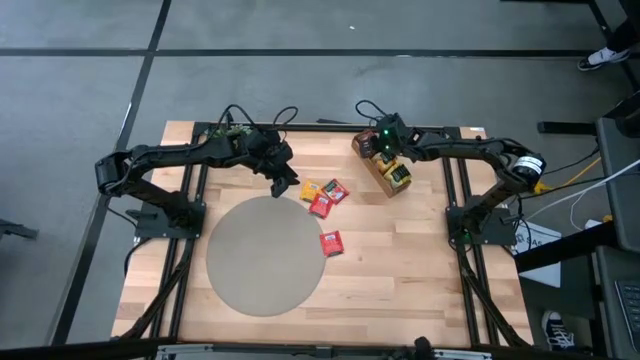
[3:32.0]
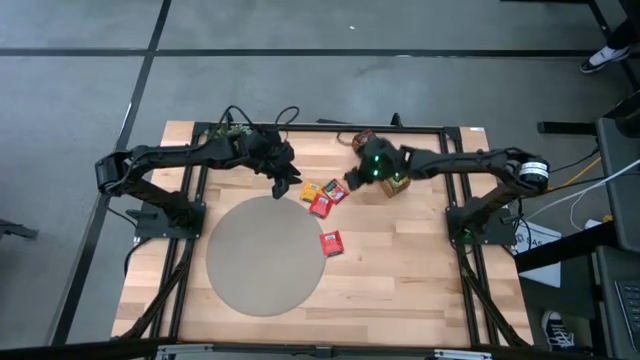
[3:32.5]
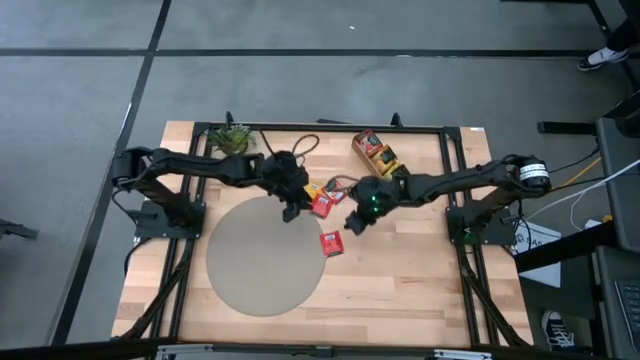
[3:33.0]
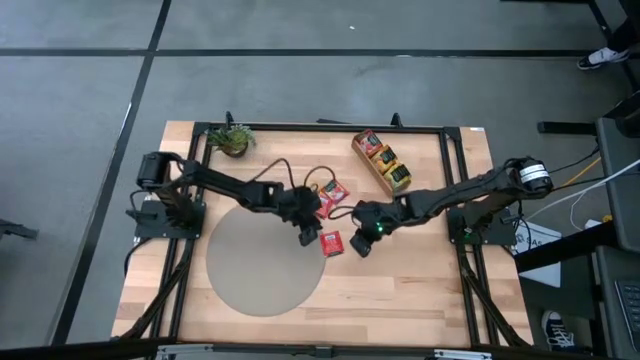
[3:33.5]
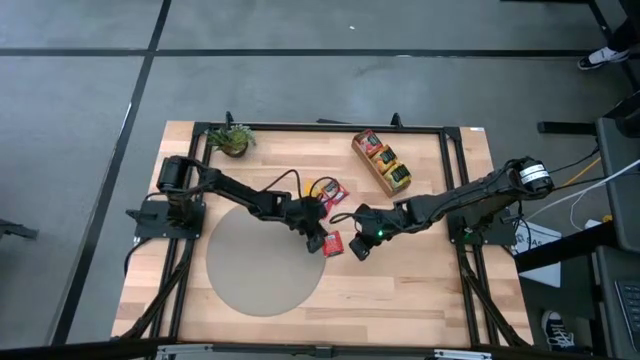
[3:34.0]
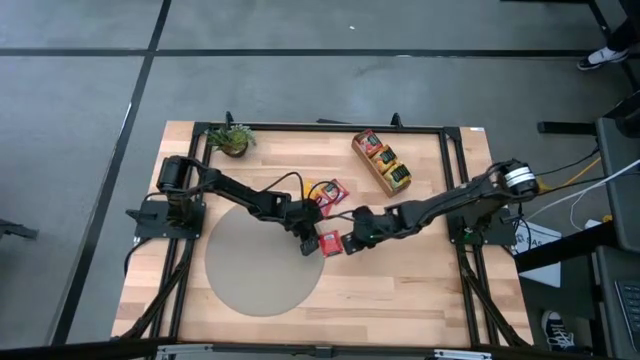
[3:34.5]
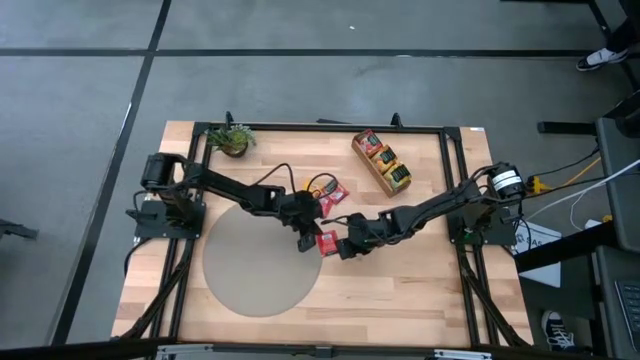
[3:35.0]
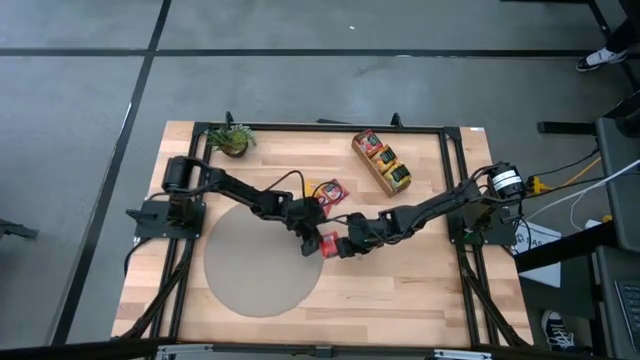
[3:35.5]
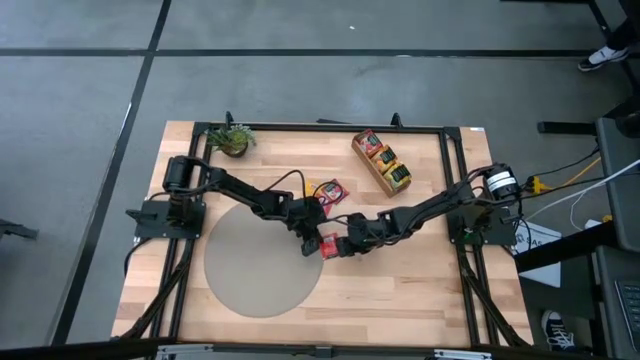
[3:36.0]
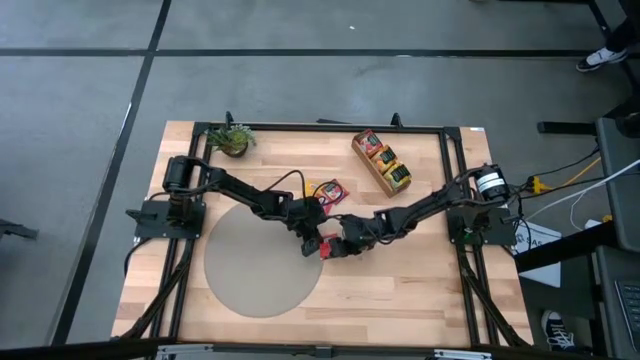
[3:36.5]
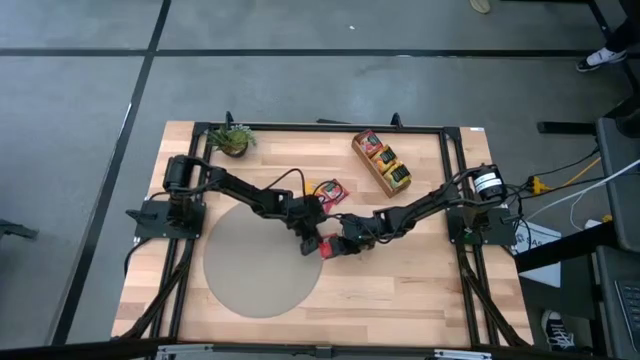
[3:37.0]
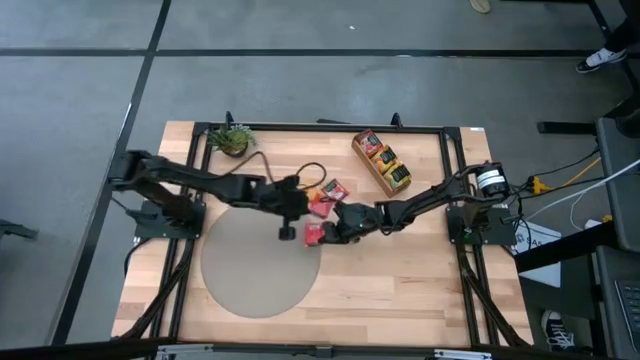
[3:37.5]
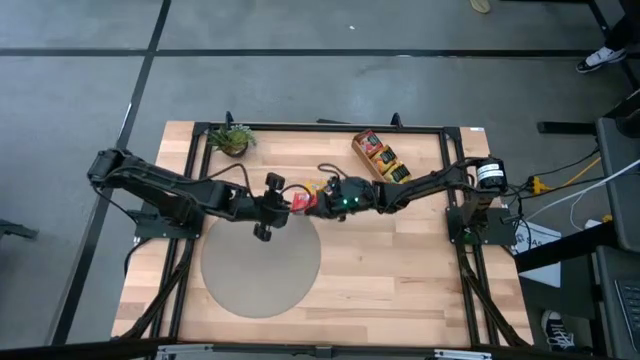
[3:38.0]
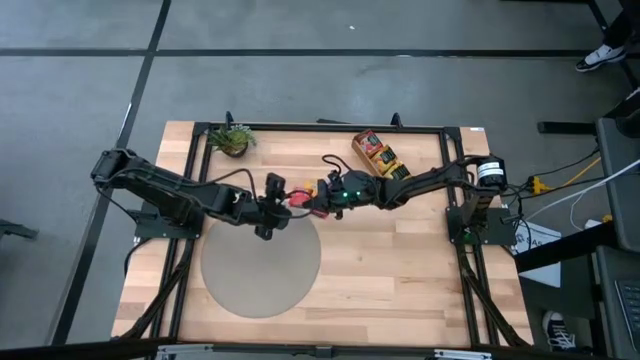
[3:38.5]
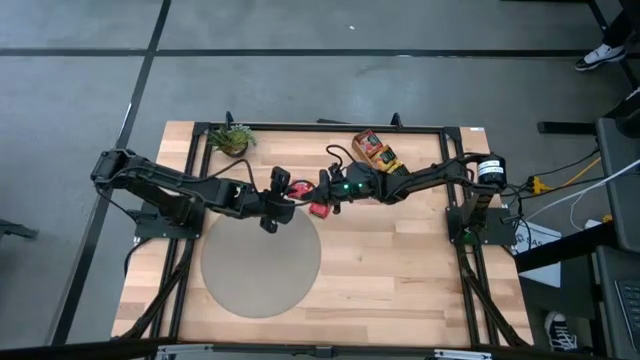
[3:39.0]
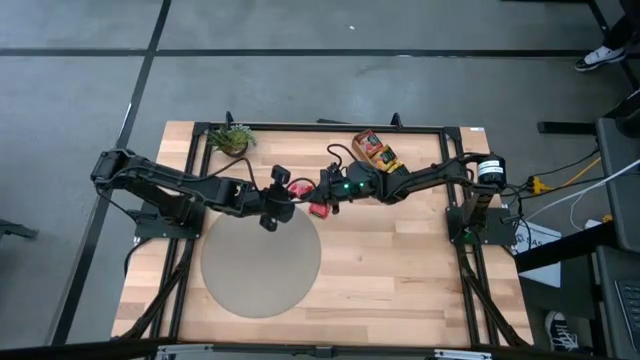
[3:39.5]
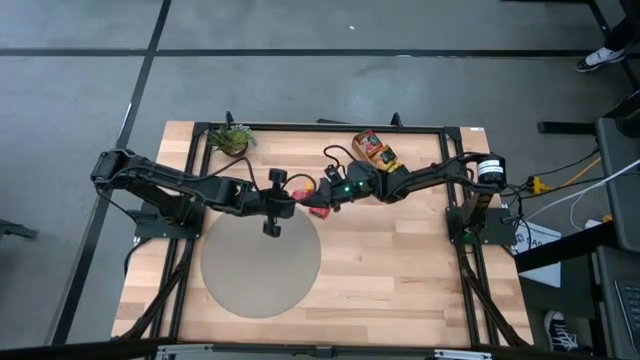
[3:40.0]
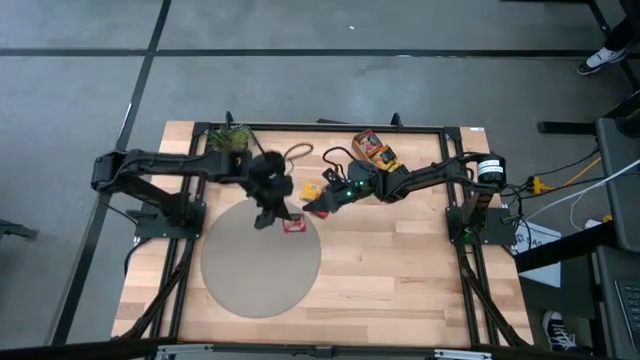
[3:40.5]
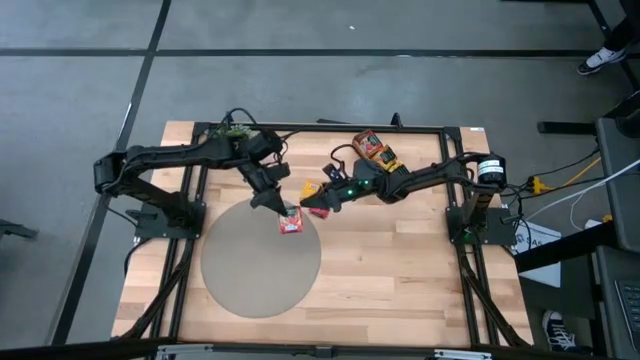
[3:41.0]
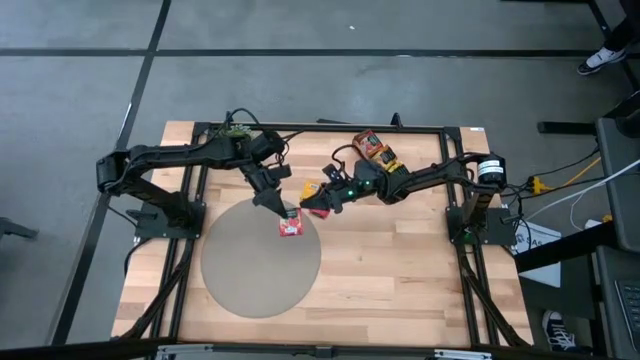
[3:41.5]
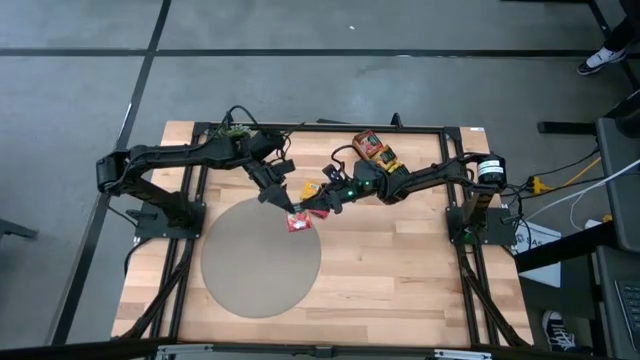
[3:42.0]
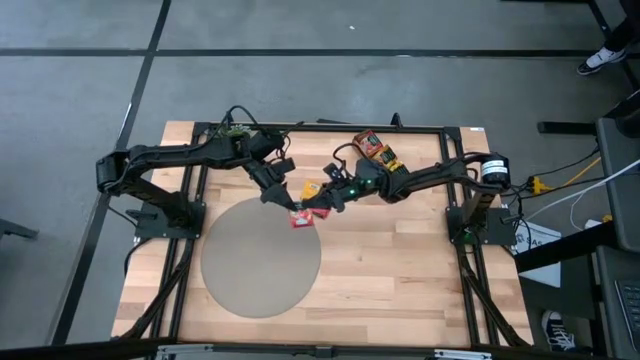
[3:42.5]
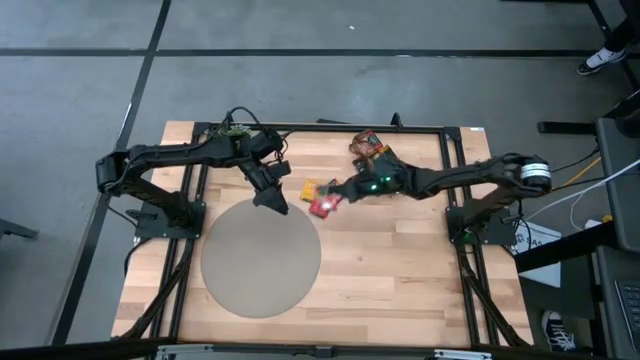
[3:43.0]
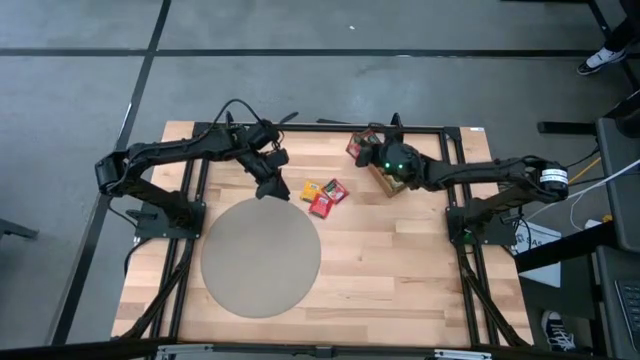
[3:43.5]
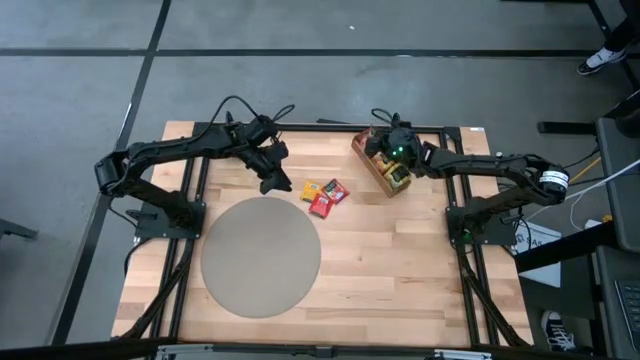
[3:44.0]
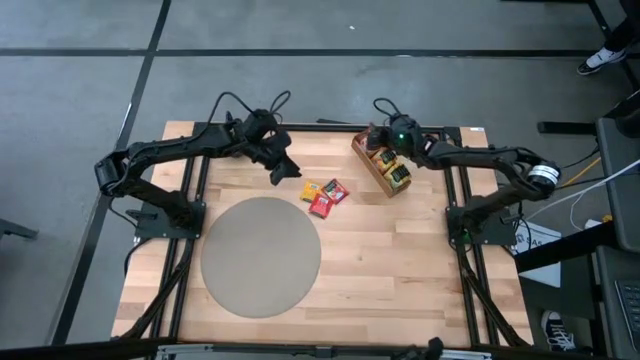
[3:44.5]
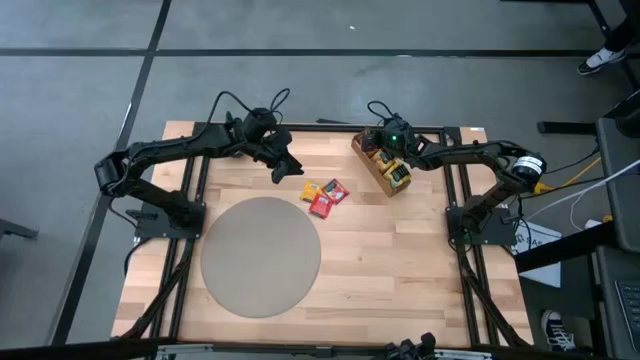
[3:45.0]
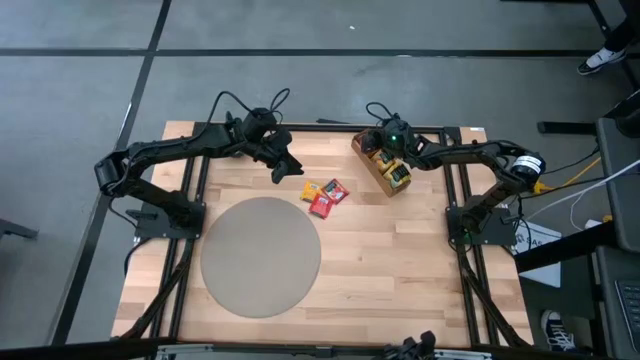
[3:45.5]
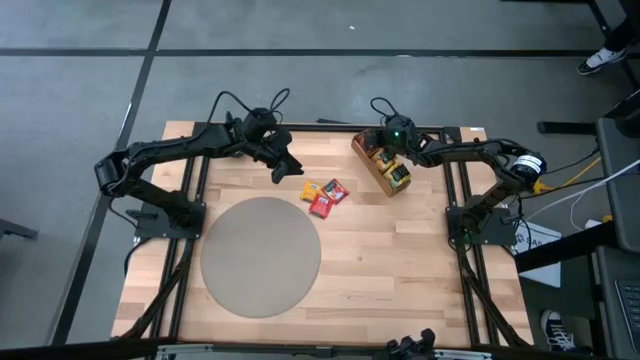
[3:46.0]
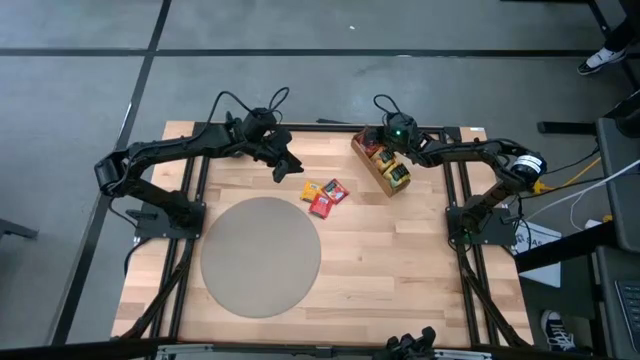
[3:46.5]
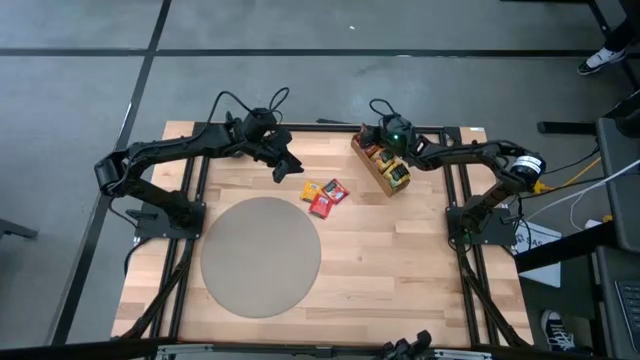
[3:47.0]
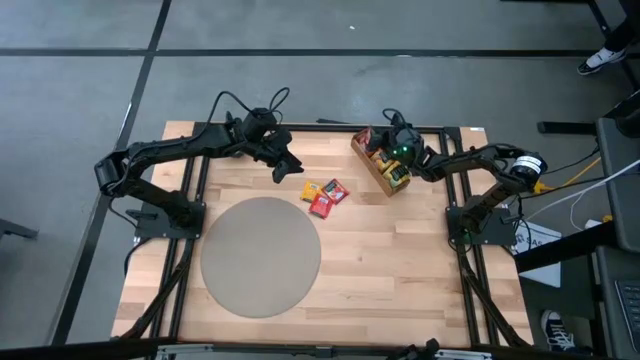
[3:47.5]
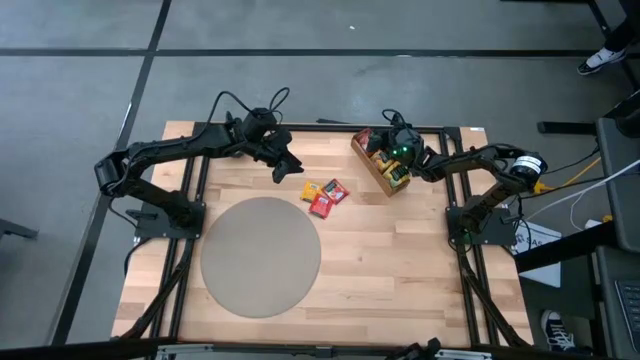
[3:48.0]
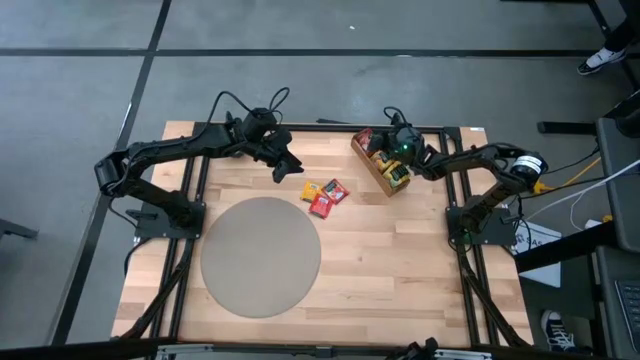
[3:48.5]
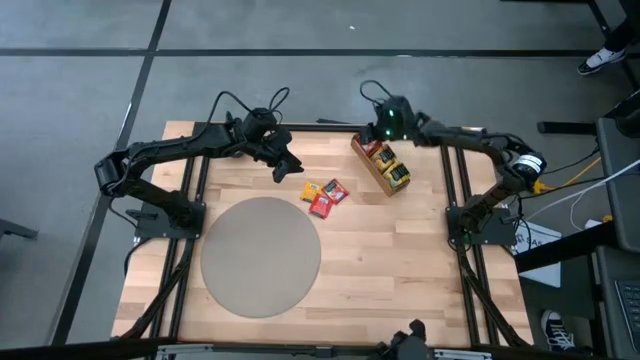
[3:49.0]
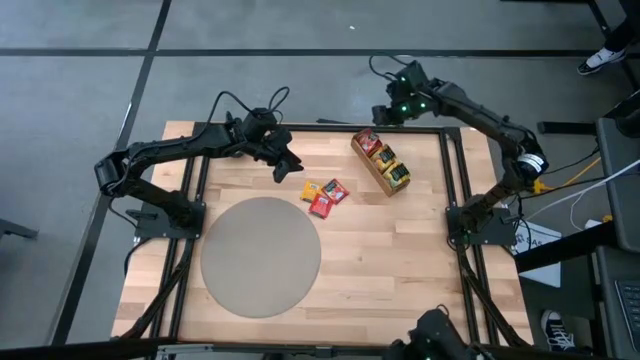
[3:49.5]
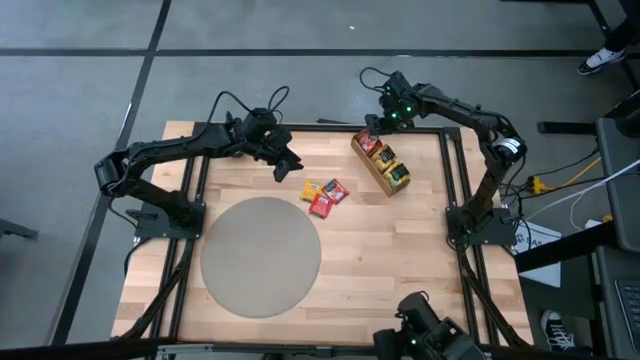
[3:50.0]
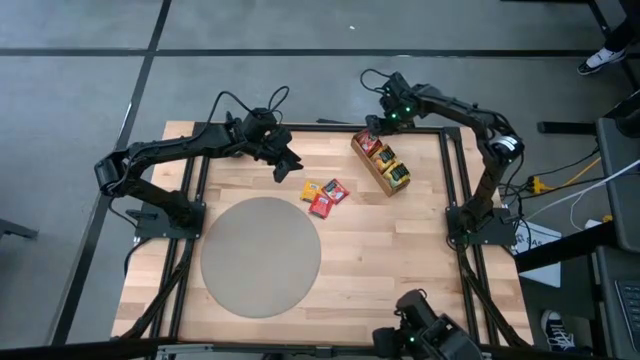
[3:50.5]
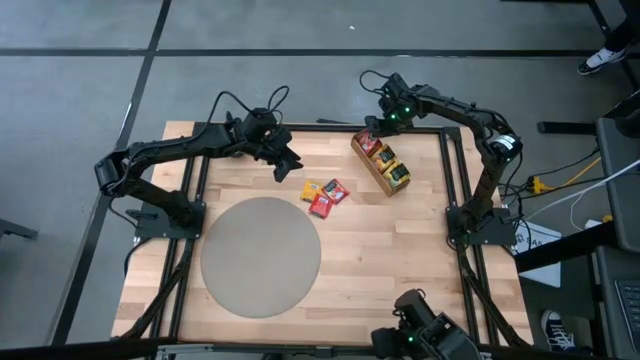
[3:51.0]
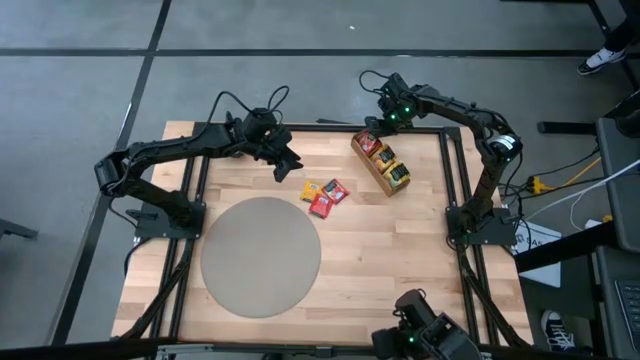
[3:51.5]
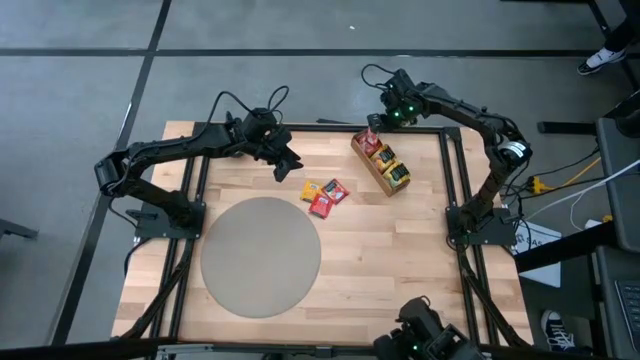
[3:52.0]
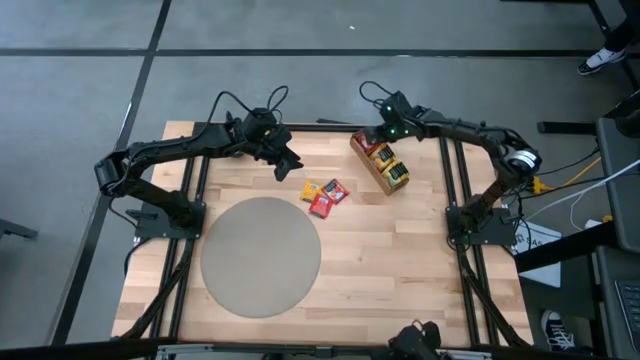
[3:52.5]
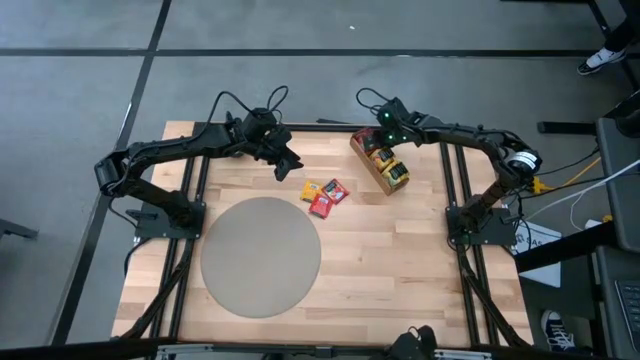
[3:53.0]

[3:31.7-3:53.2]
Task: Pick & Place Tea
Put the red tea bag into the top section of the wooden organizer

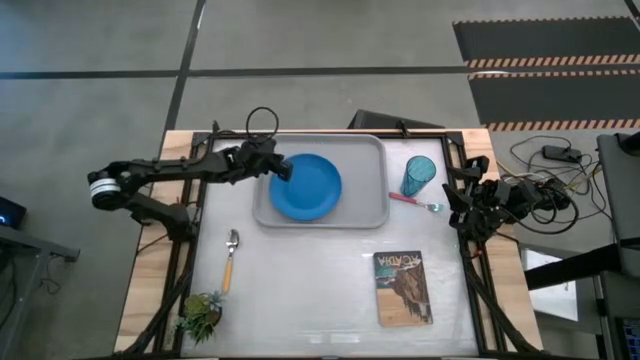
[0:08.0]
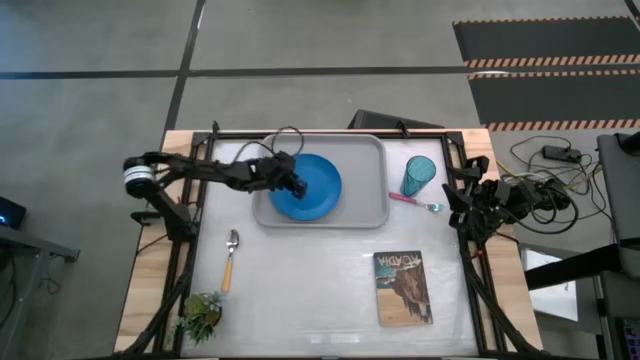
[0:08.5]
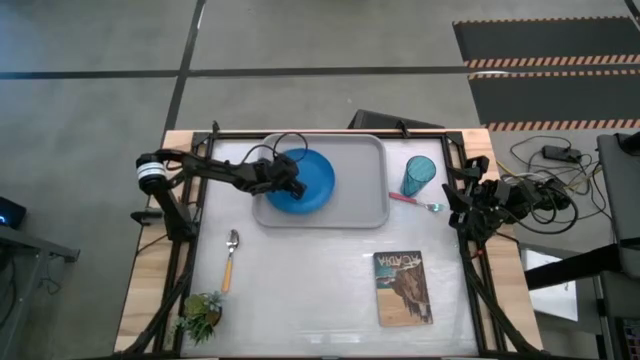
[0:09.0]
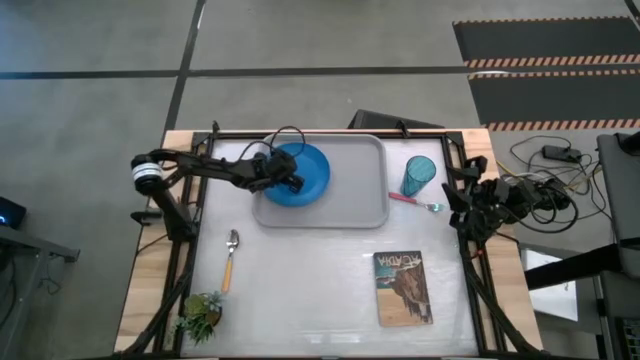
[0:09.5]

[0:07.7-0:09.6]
Task: Pick and place plate/cup/fork/spoon on tray
Put the blue plate on the top left of the gray tray
